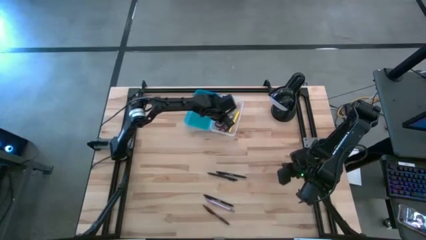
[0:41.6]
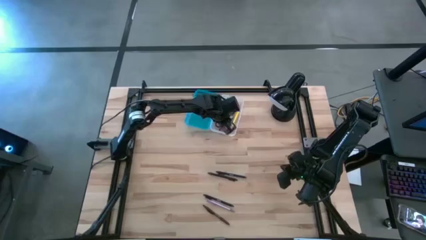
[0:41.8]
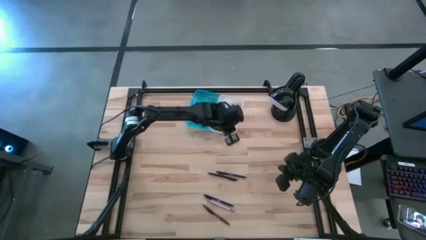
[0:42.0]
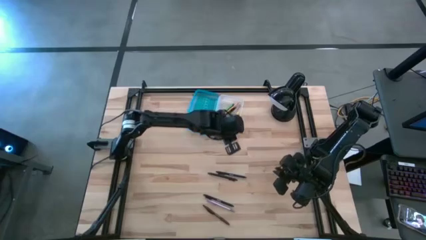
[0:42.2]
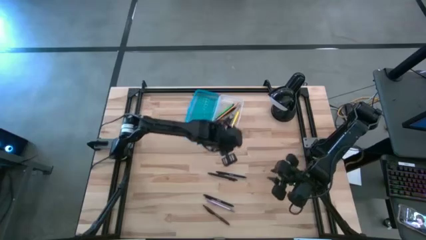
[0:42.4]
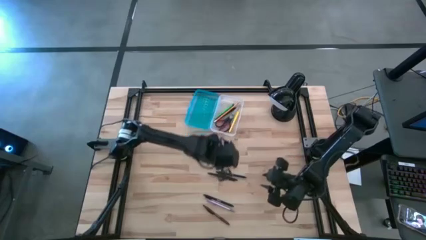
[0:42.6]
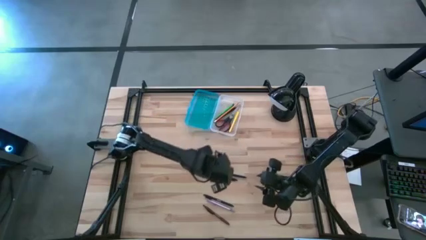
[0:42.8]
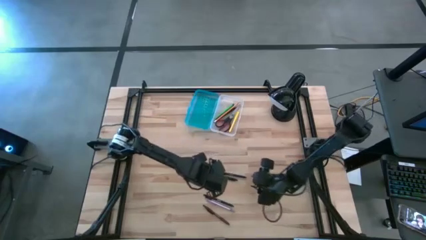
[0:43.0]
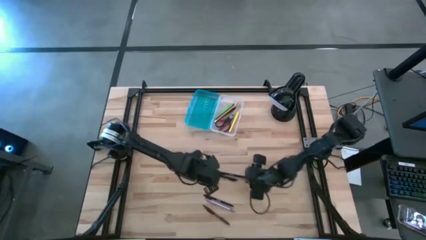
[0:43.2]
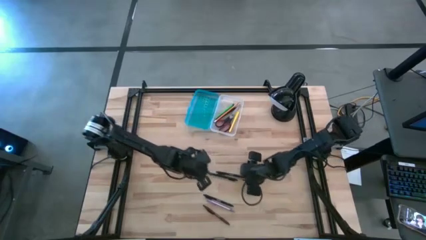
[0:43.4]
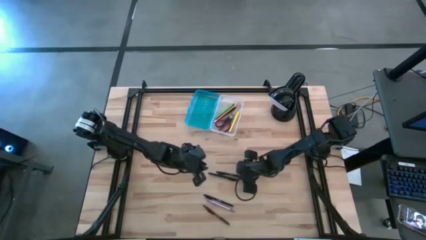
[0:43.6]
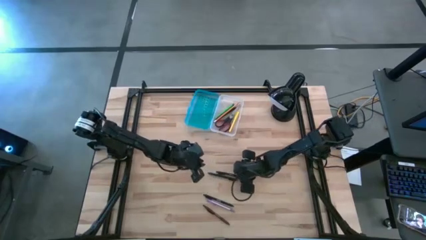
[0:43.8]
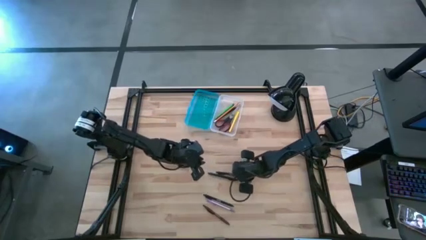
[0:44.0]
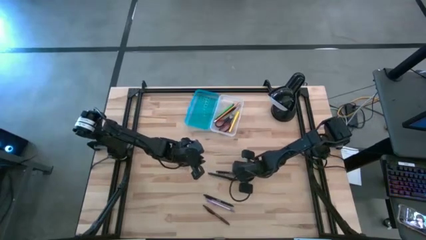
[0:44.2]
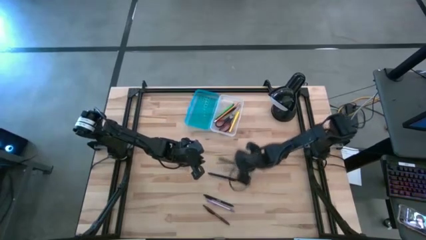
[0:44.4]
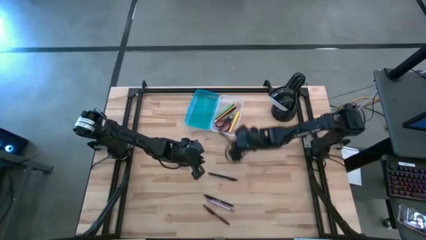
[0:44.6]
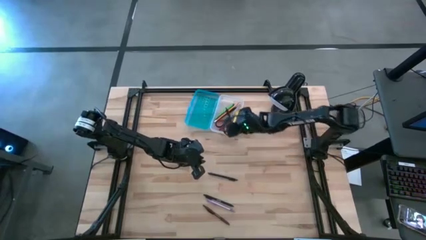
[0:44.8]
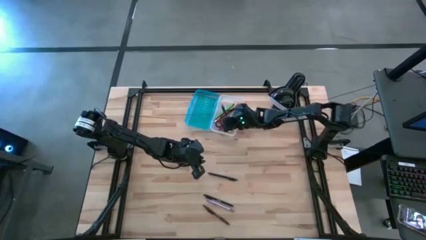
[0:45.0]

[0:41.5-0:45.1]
Task: Pick & place school supplies into a supply box
Put the top black pen into the blue supply box

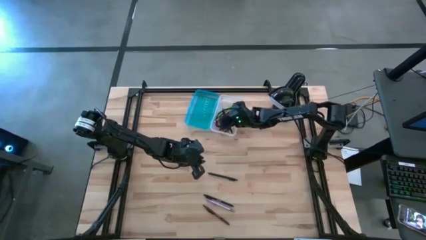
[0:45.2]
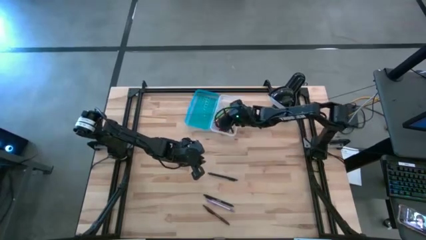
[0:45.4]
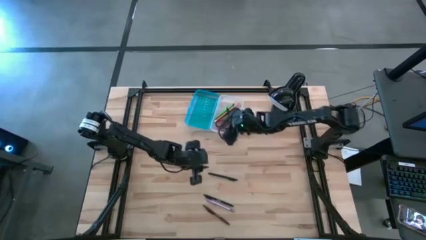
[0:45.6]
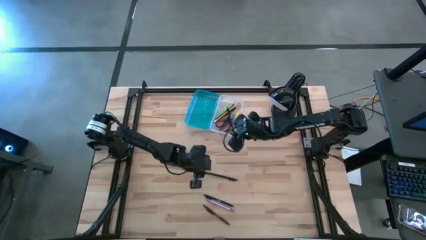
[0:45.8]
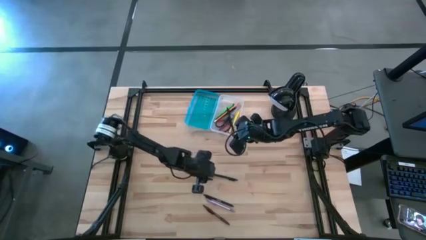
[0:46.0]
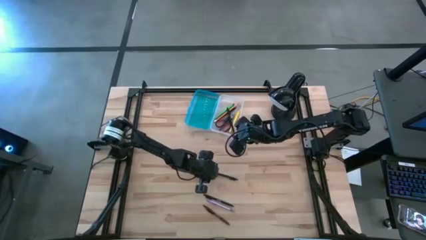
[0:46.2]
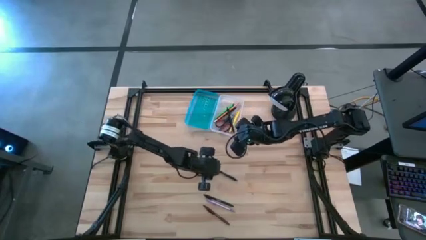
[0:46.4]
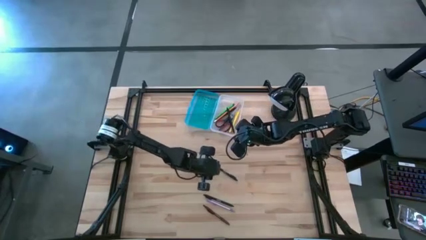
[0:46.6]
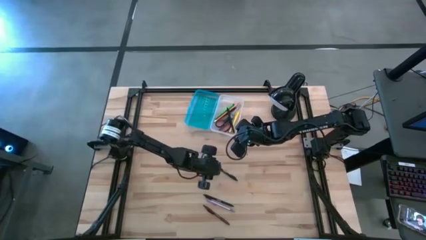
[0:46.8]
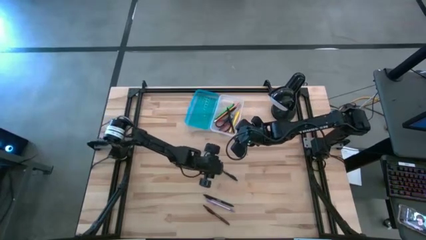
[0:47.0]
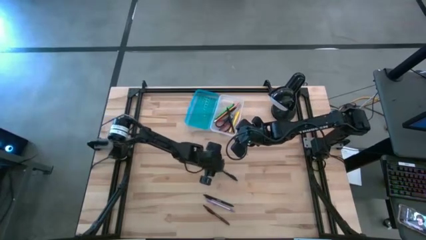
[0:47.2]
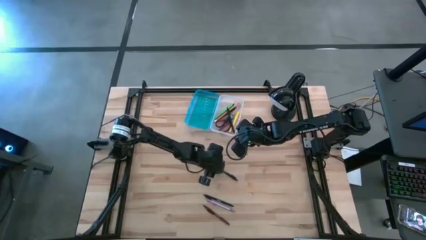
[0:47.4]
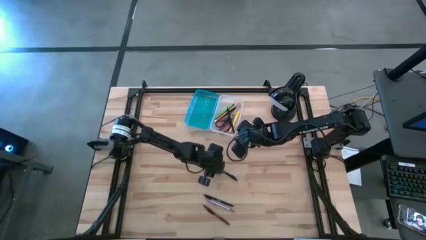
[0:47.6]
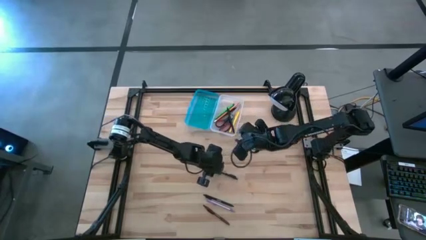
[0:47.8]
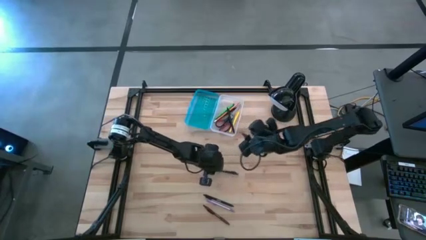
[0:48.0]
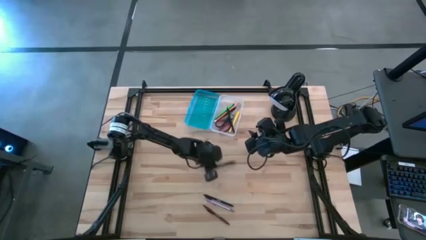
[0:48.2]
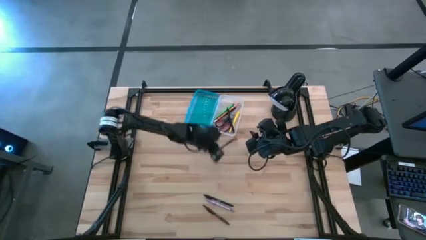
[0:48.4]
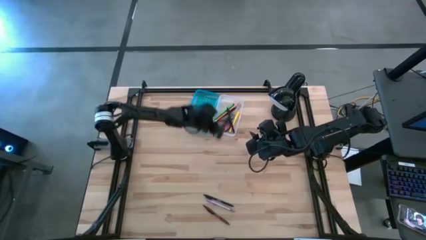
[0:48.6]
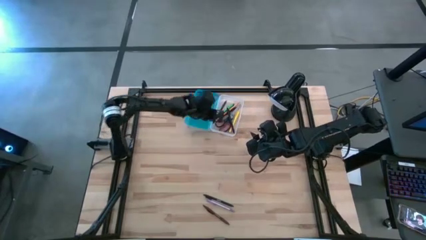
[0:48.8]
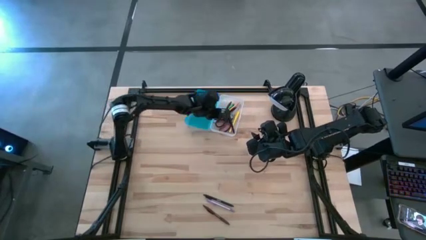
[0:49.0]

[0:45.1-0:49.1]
Put the top black pen into the blue supply box

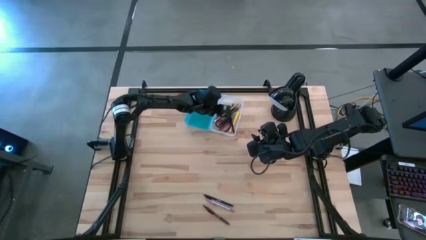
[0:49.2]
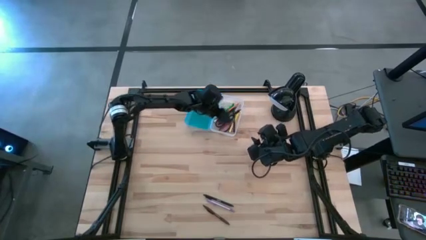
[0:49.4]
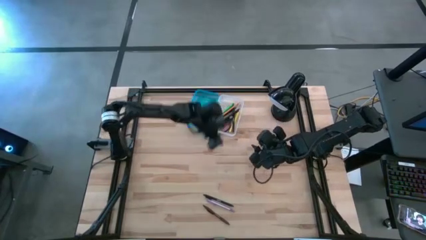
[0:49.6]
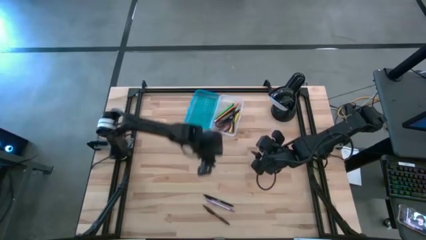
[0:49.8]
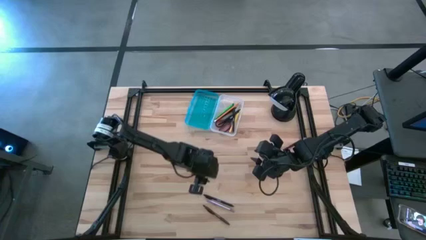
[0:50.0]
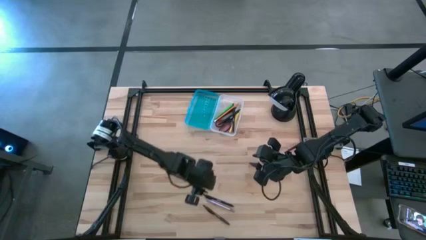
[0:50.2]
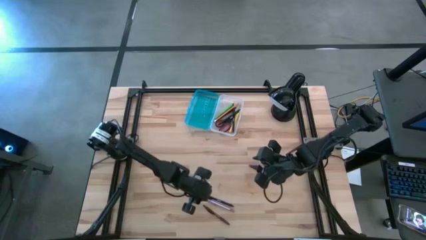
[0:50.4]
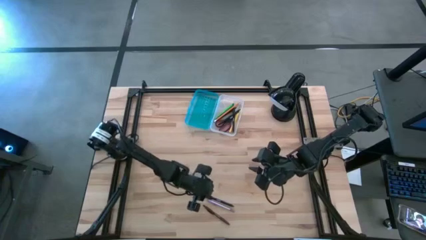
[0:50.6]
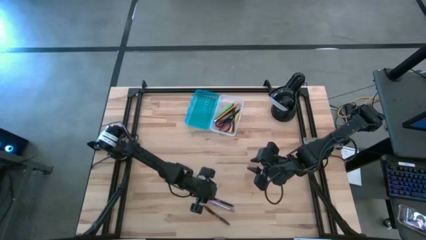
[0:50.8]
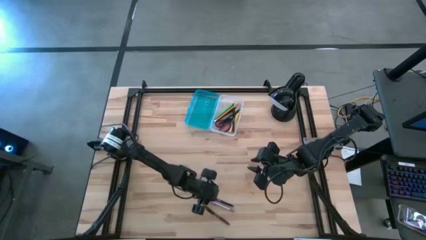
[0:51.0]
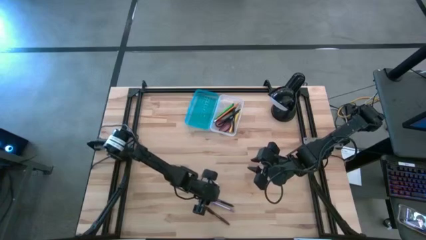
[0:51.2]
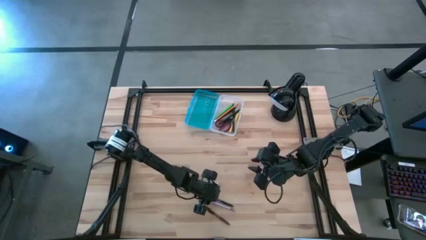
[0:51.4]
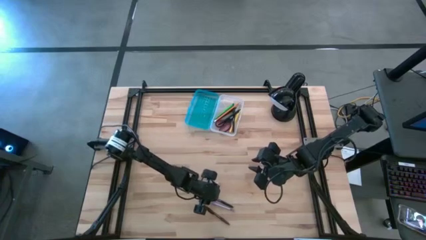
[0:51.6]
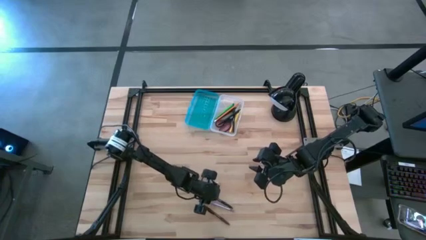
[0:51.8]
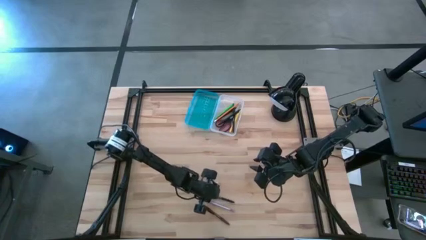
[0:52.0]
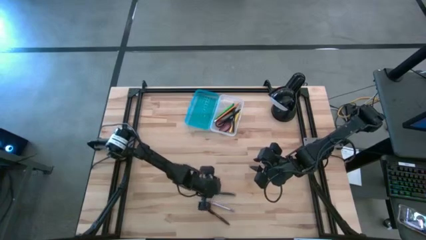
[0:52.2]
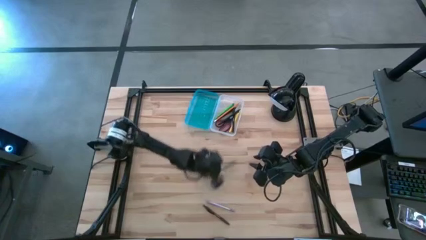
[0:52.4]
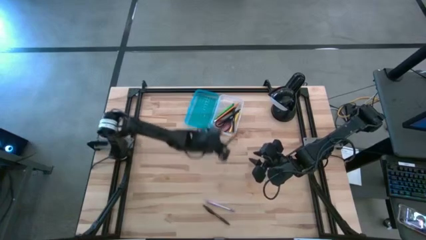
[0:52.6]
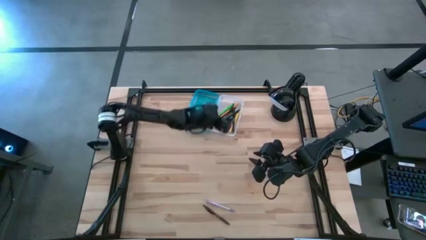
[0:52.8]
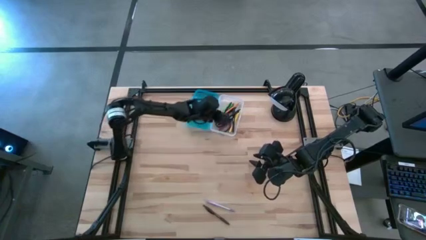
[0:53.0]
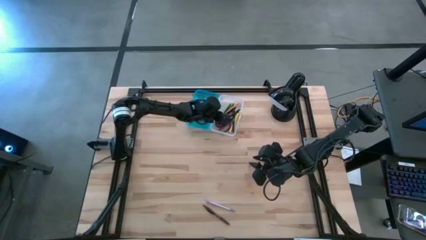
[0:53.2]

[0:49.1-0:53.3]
Put the black pen into the blue supply box

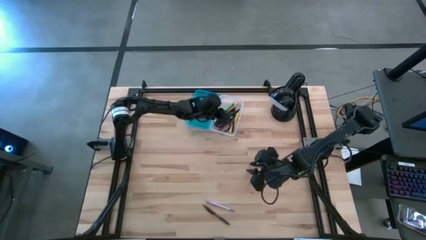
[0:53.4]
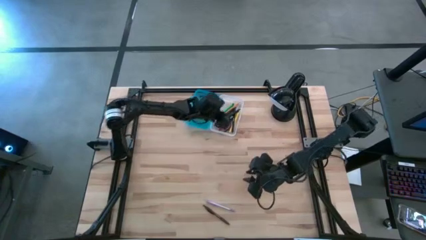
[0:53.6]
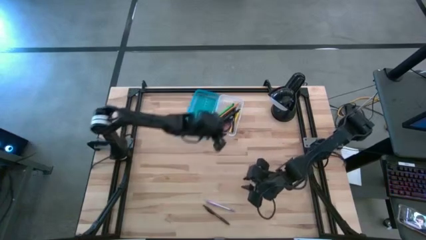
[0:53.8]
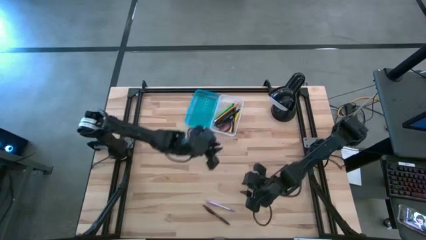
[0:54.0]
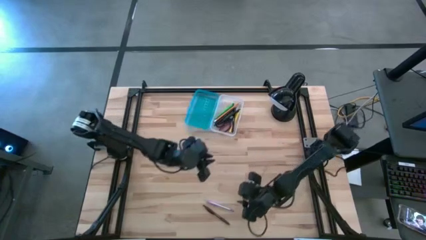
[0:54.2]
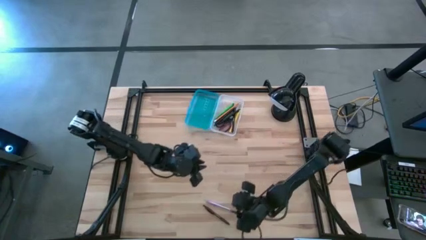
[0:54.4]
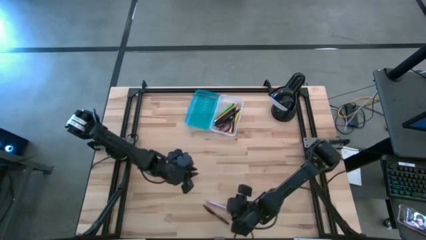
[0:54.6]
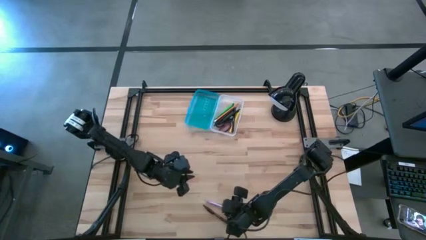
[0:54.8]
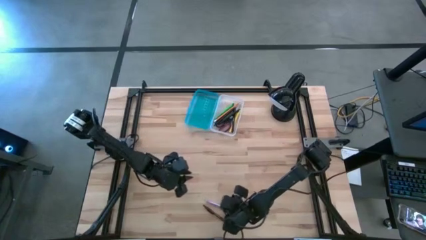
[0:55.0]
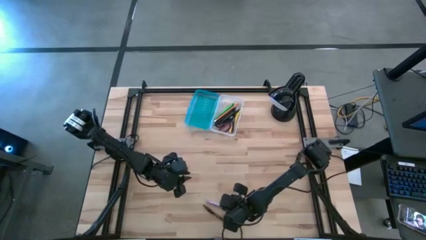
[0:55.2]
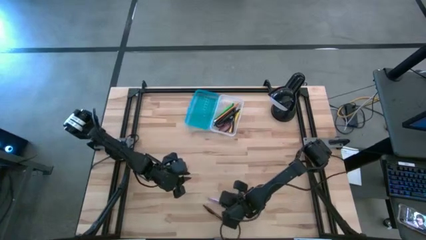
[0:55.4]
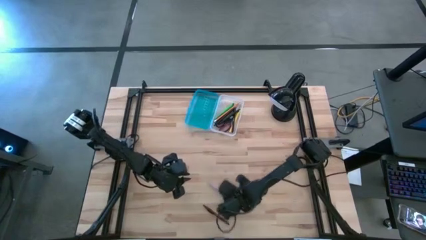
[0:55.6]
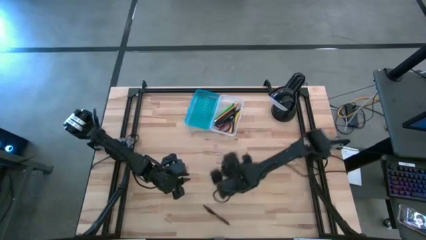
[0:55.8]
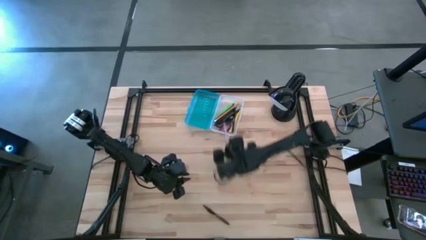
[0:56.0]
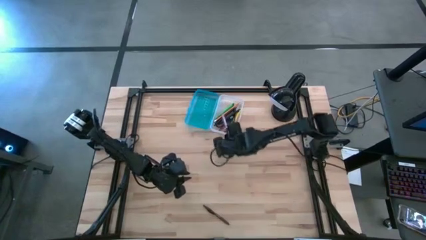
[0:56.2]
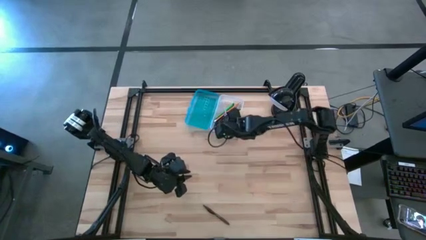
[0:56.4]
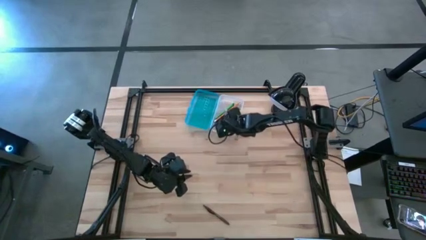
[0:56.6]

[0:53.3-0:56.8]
Put the violet pen into the blue supply box
